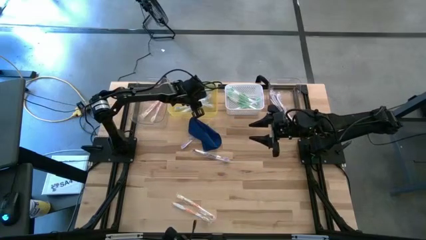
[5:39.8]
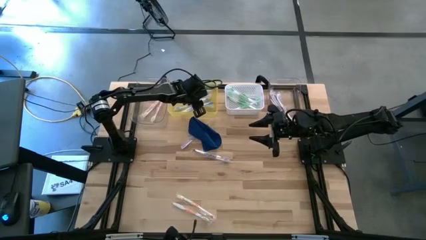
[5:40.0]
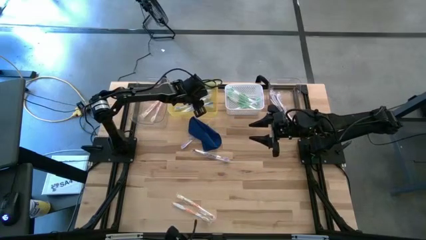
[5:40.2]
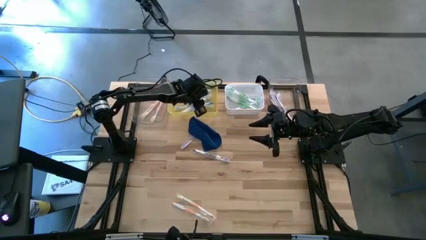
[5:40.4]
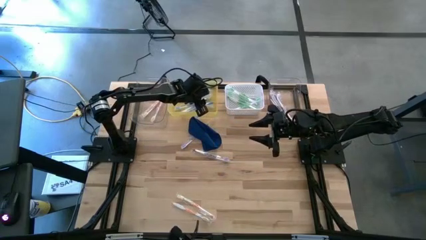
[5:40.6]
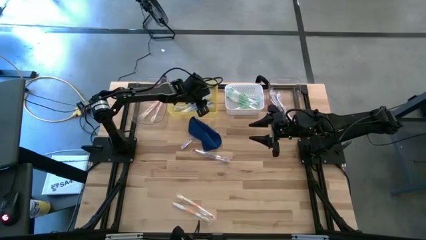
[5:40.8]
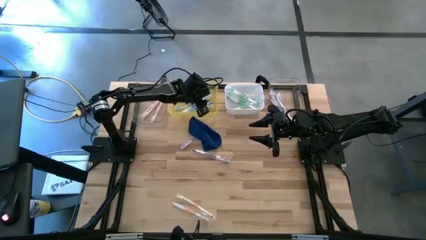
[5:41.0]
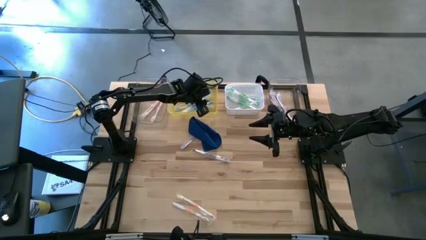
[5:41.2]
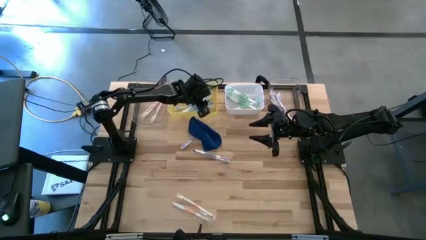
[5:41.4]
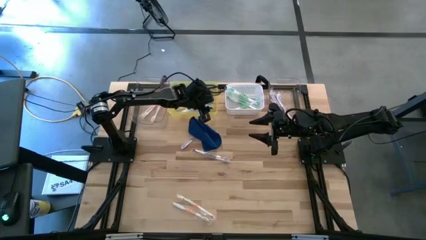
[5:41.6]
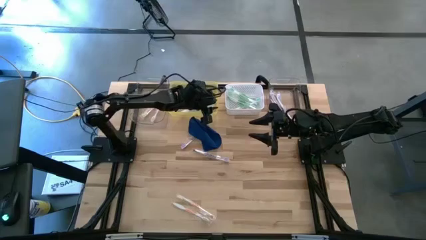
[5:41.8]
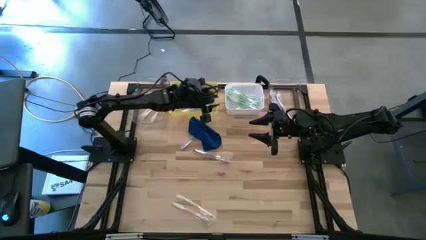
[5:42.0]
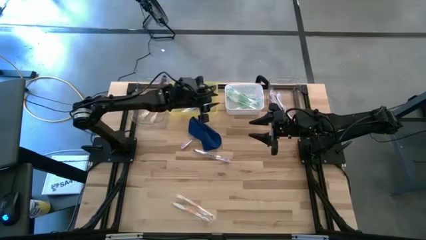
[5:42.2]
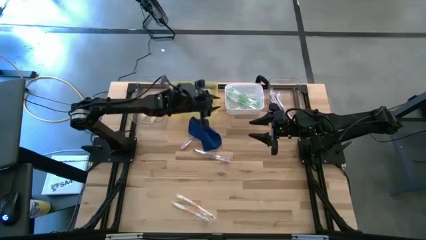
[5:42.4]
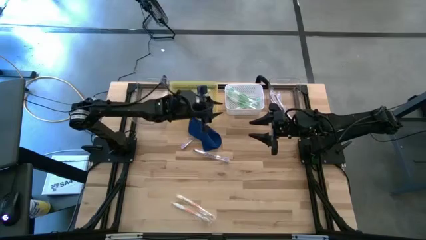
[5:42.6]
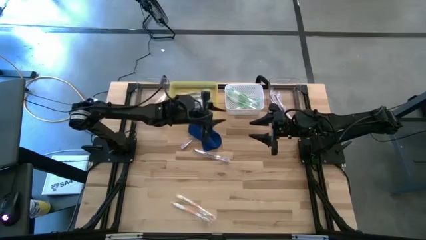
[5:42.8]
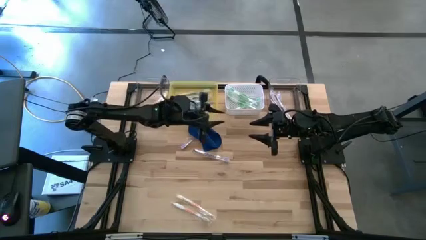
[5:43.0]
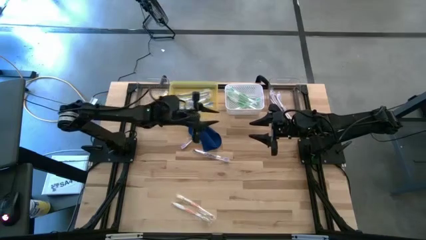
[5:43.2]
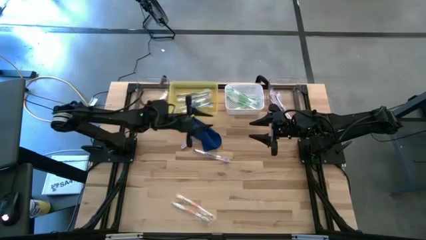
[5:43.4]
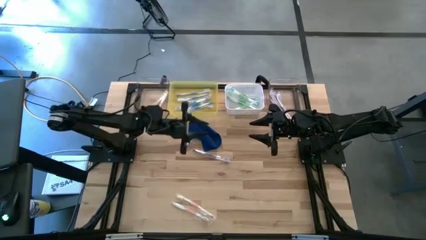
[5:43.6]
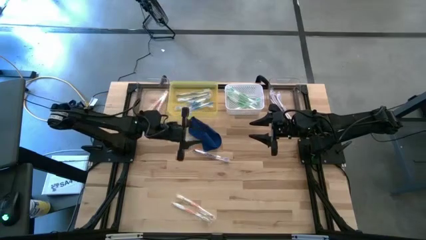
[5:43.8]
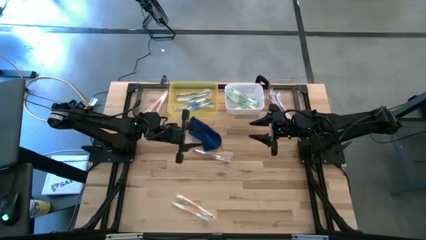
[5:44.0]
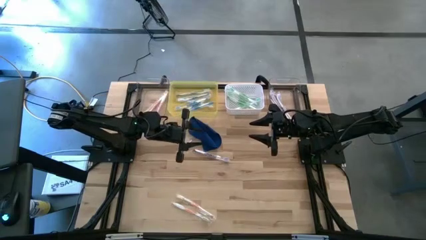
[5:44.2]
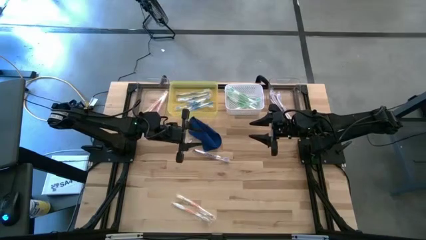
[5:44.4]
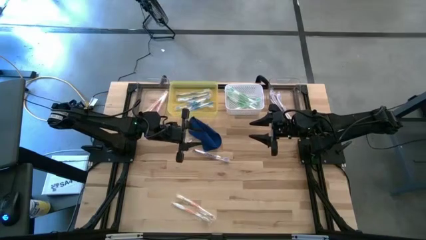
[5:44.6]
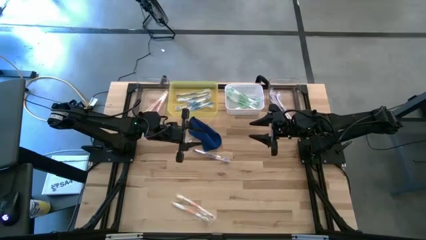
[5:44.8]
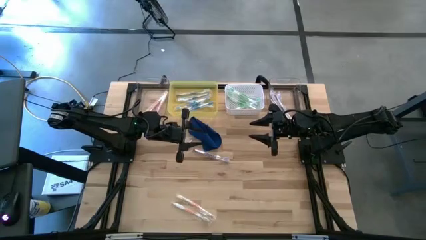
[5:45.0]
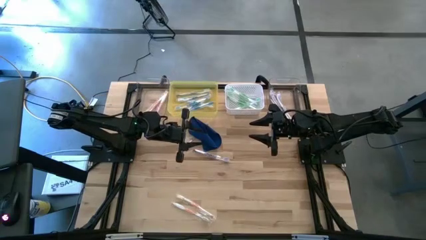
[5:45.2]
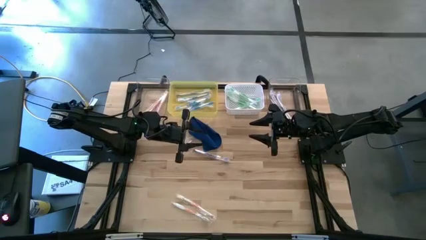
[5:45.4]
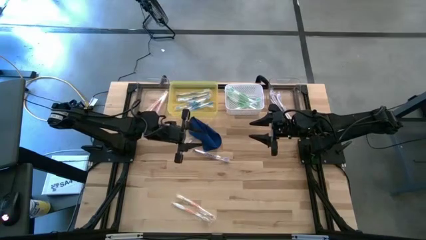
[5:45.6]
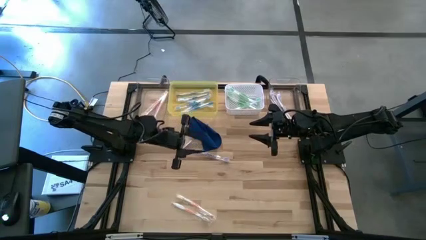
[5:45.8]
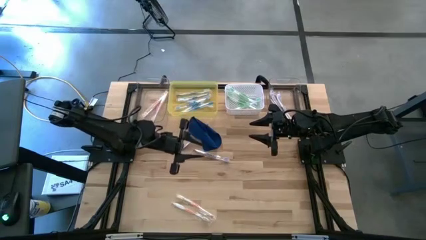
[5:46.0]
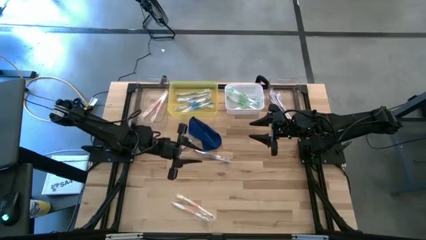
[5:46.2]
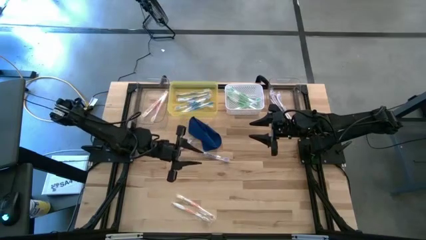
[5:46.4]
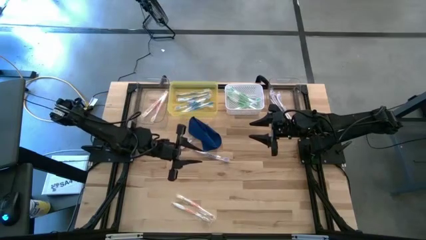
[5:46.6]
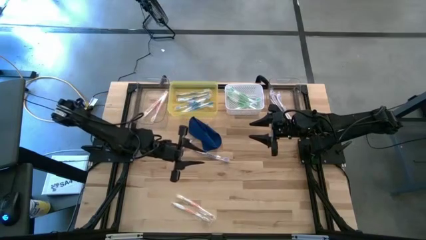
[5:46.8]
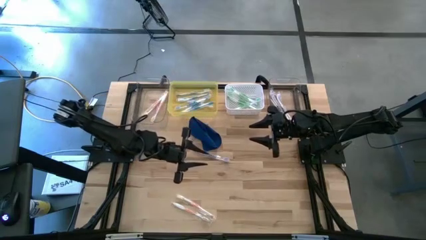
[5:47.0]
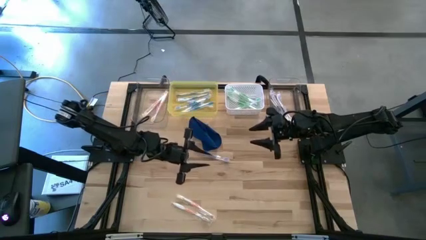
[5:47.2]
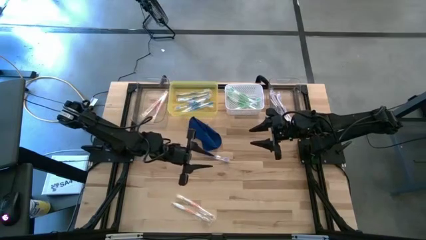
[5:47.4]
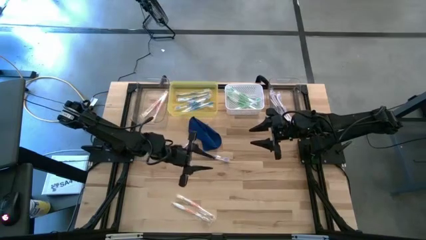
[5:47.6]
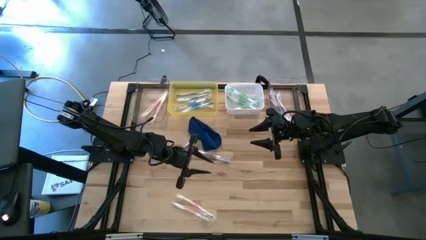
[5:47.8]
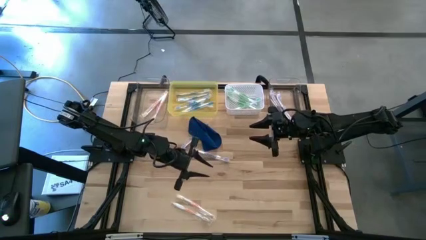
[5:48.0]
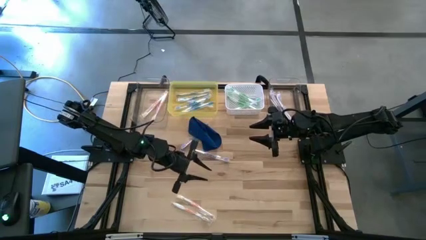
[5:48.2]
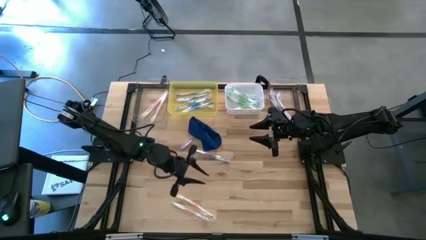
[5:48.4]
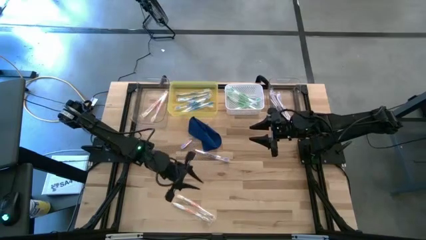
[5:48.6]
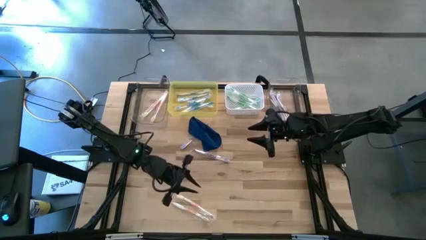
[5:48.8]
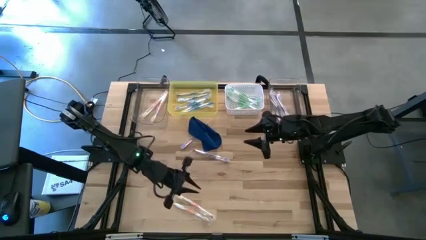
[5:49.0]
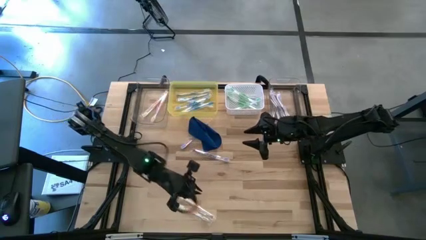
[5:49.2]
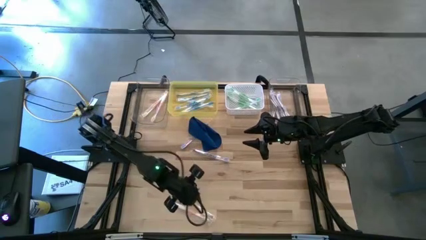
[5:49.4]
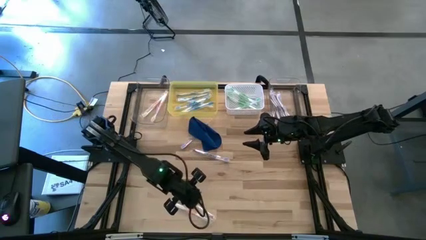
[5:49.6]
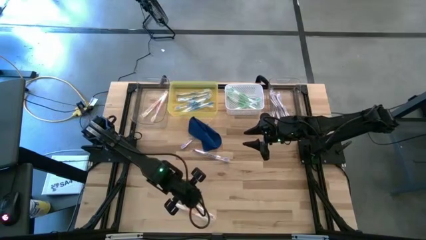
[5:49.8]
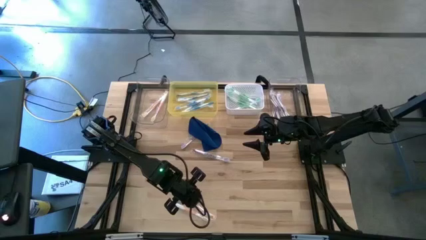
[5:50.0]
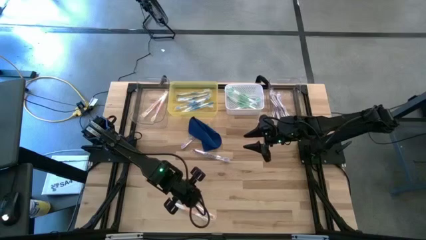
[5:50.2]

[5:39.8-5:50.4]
Task: Pick & Place Toothbrushes
Put the orange toothbrush into the left transparent bin

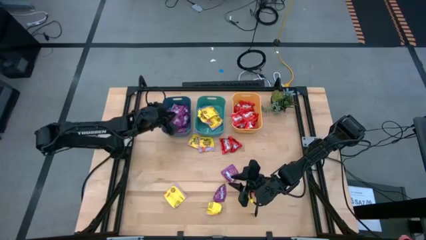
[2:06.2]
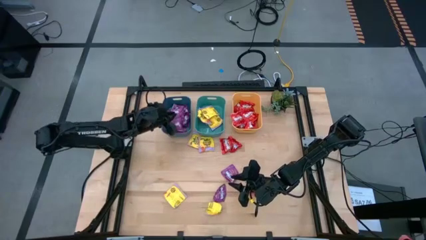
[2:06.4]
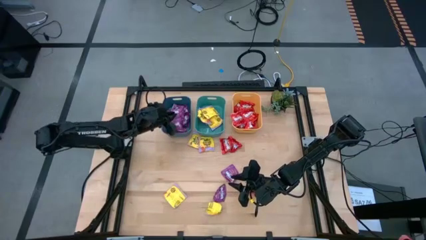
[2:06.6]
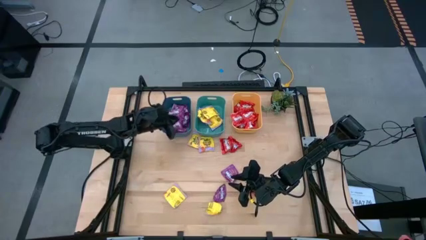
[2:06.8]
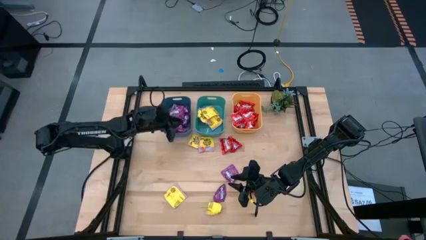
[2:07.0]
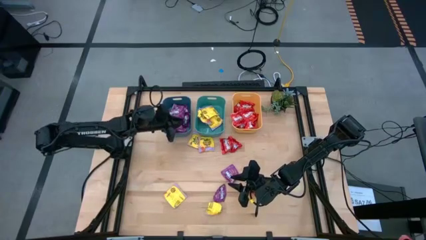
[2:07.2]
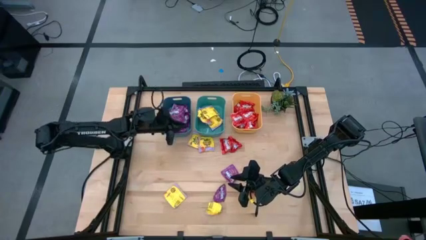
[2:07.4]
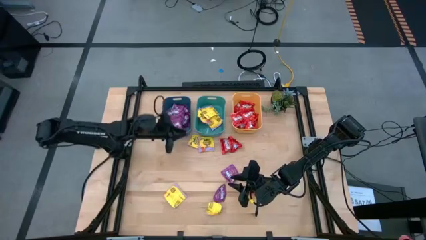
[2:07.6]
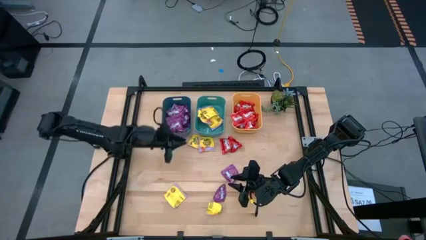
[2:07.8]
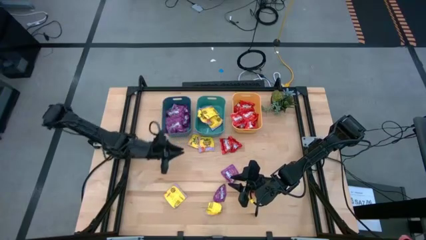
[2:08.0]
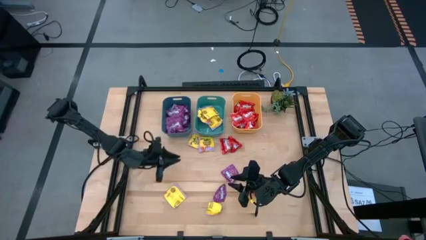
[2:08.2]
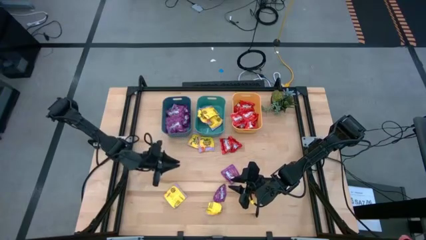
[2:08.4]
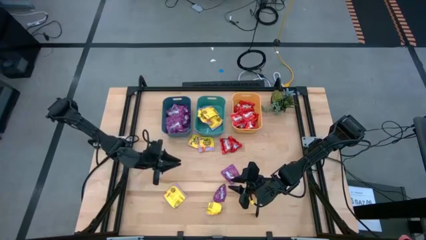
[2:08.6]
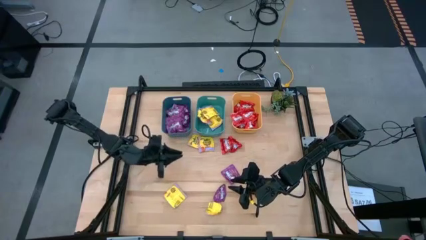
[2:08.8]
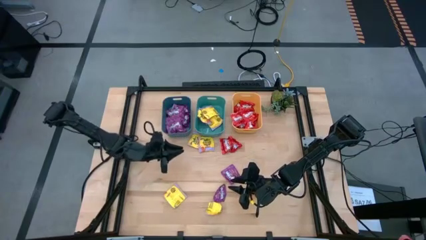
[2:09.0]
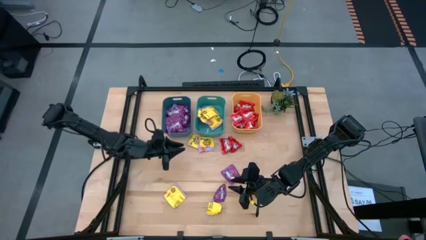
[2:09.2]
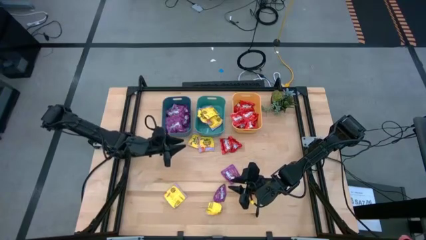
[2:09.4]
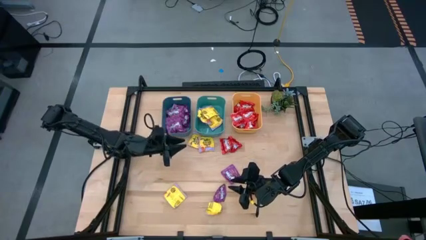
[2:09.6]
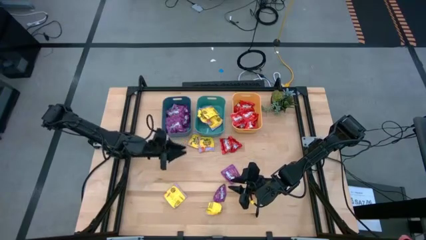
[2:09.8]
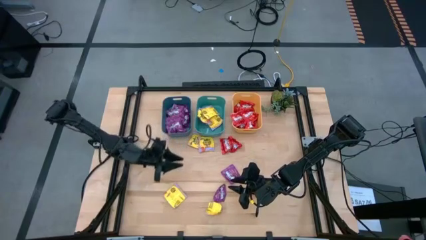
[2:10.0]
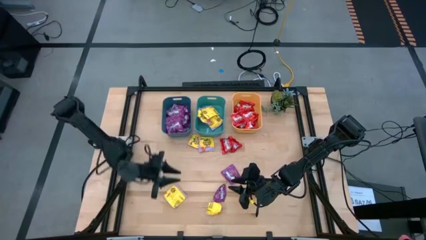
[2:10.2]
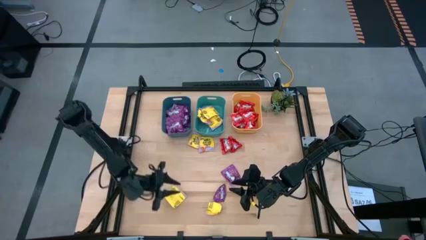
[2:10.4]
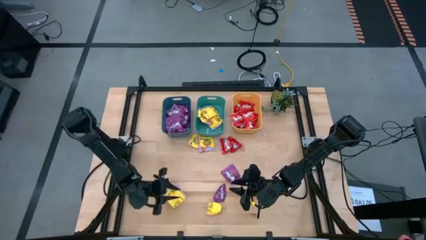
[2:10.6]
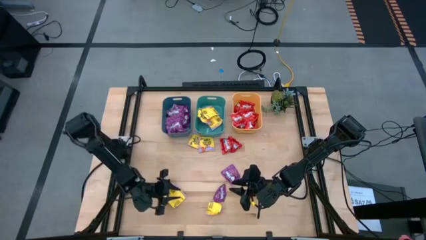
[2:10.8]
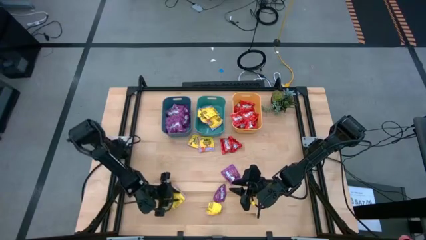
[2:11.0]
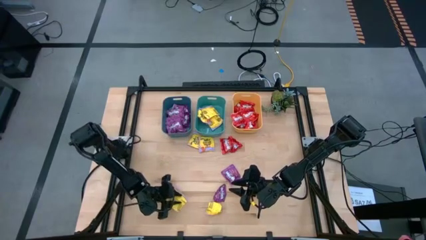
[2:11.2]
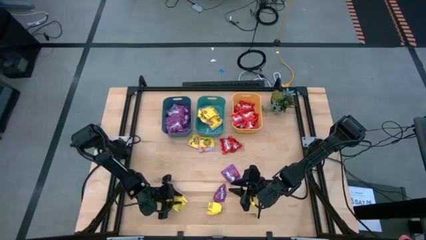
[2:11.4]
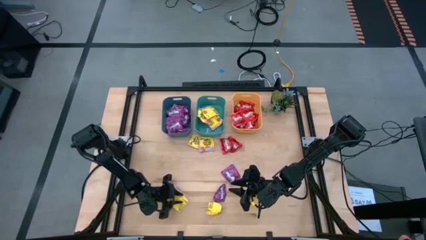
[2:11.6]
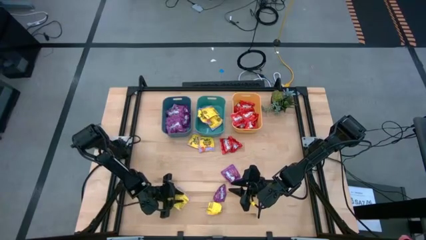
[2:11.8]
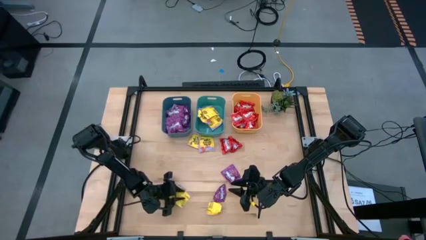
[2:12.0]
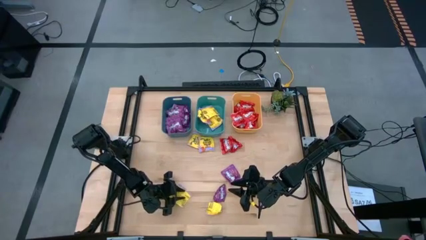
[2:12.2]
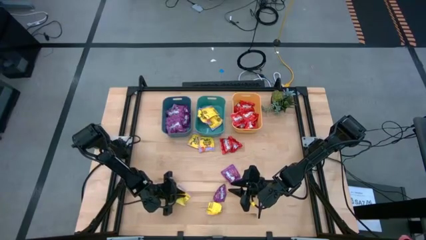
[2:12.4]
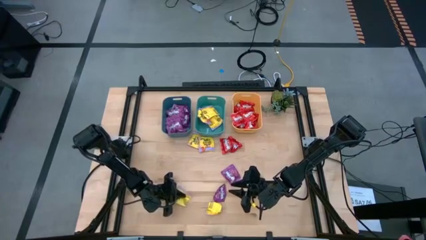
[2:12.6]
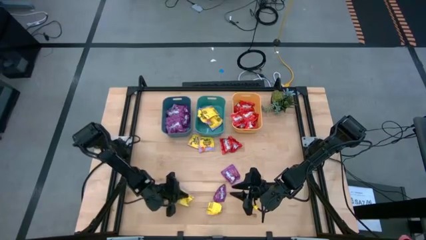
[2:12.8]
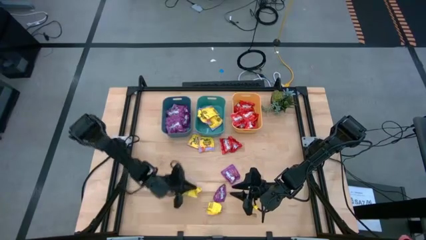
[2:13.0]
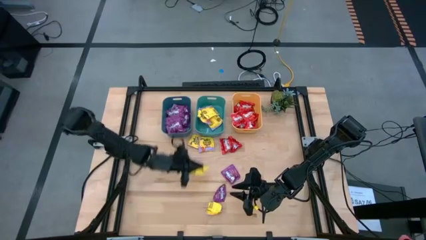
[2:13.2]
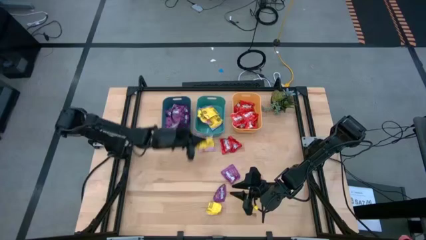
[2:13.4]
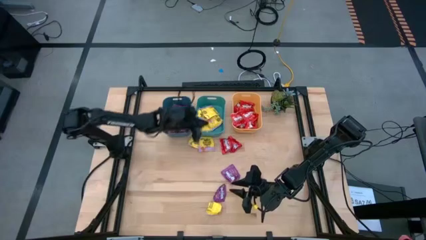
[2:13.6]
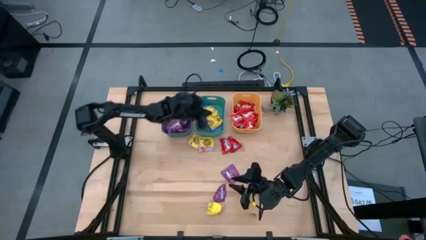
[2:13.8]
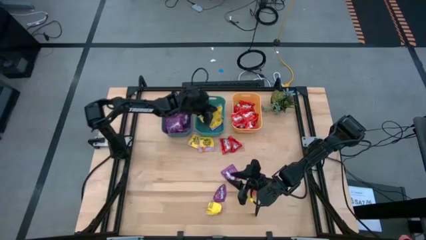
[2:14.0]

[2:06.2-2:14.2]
Task: Sort candy
Put the yellow candy into the green bin
